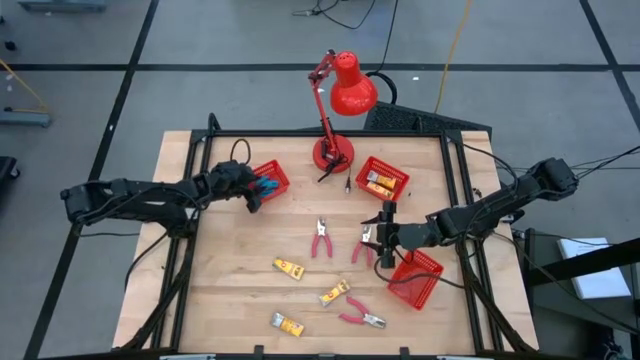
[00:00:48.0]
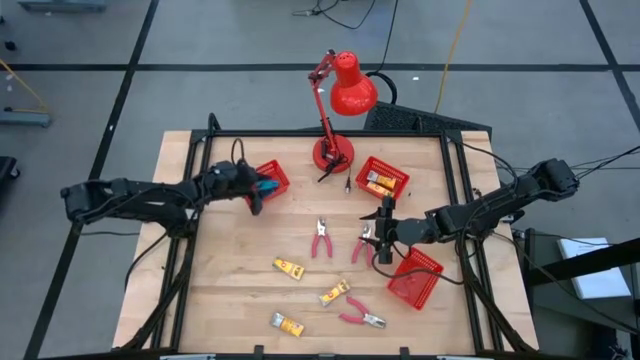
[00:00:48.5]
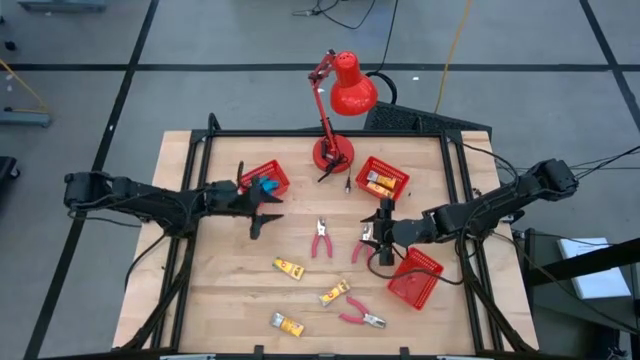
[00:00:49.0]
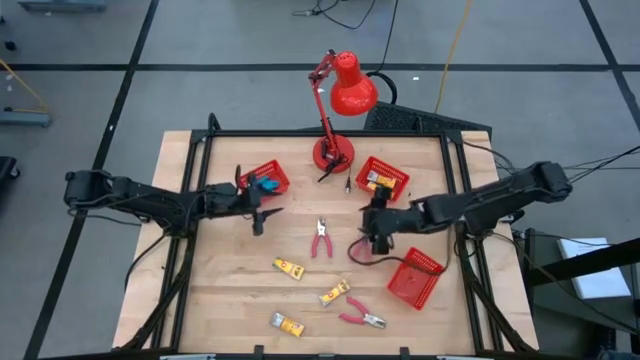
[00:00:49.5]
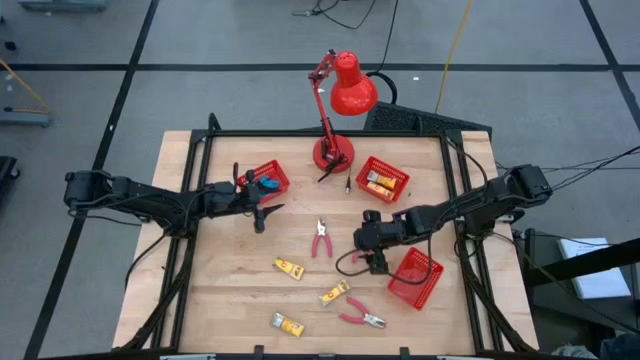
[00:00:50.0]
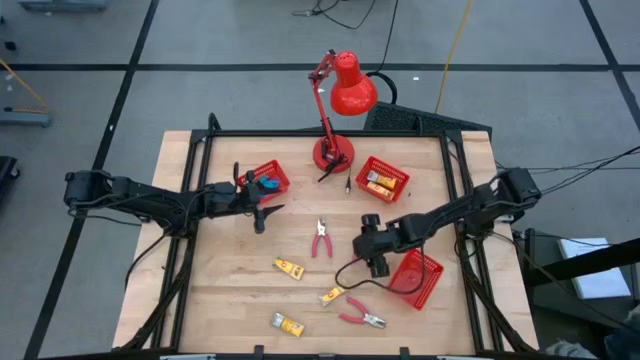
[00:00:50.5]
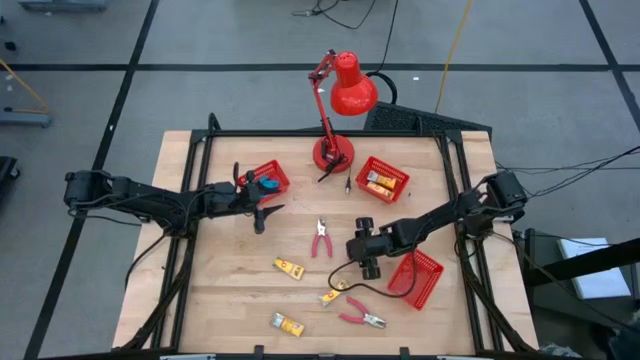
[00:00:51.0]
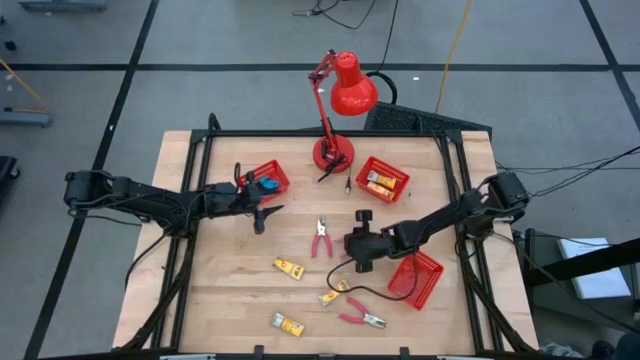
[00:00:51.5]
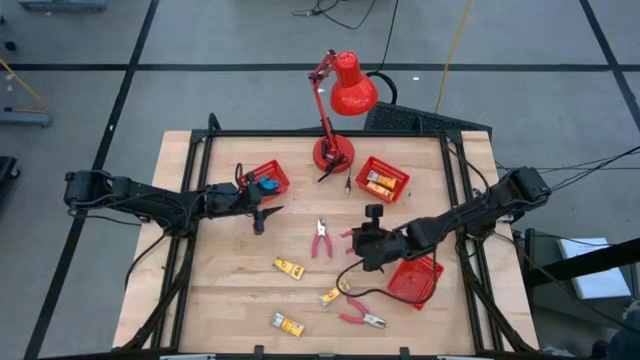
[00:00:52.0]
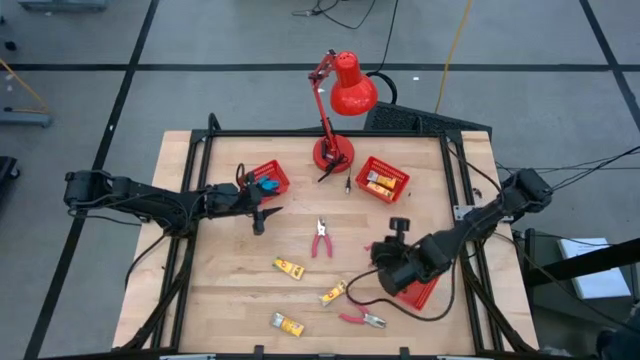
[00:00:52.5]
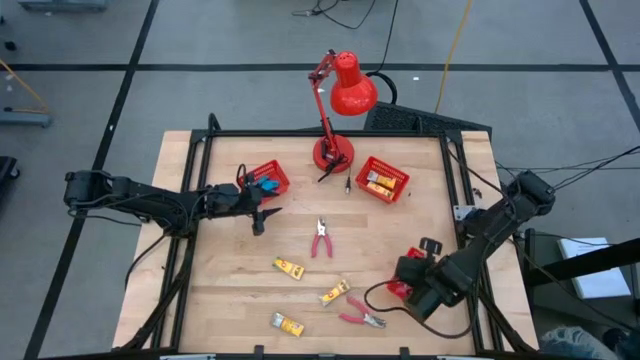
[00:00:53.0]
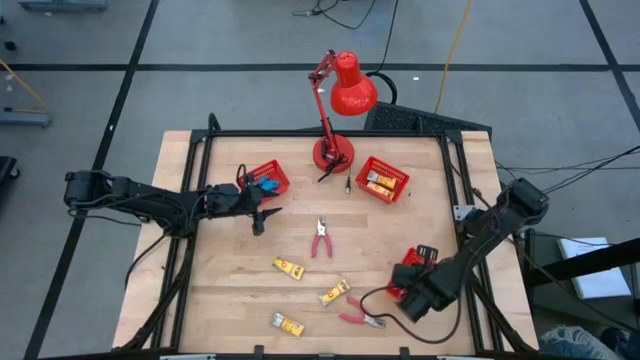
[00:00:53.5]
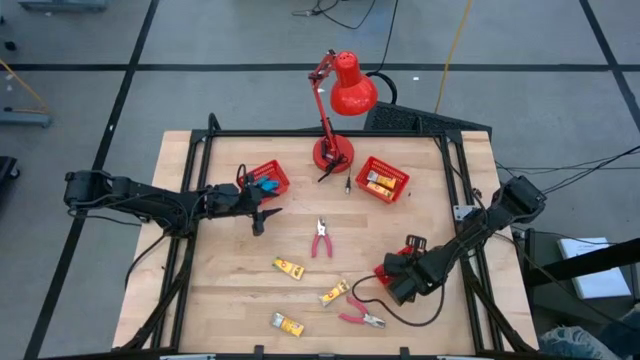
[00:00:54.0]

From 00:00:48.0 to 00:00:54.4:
Task: Pick & Place School Supplies
Put the pink hole puncher into the bottom red bin

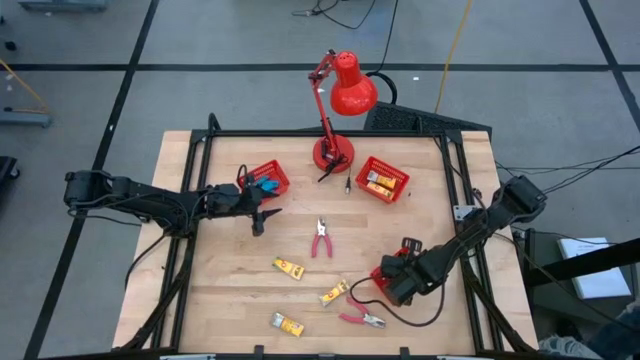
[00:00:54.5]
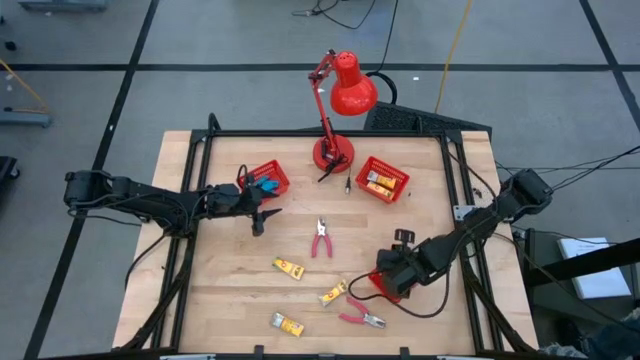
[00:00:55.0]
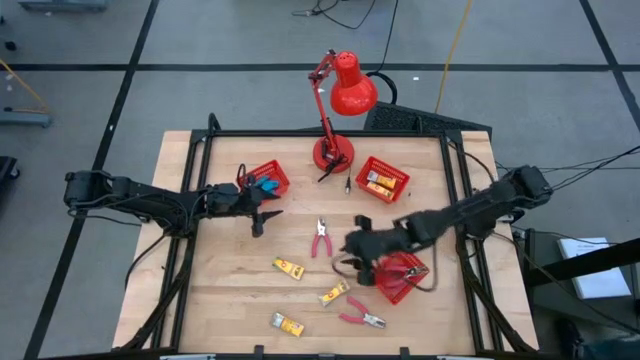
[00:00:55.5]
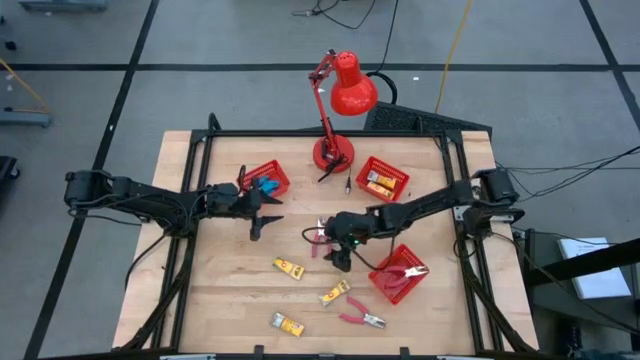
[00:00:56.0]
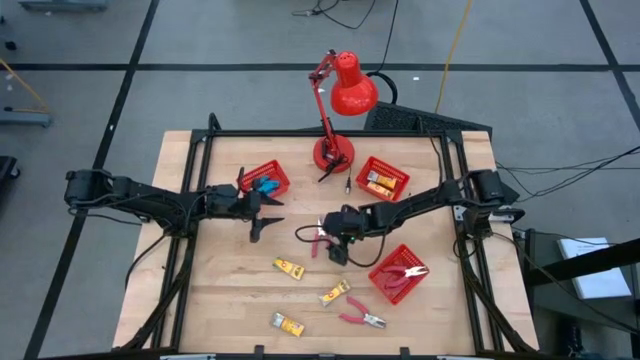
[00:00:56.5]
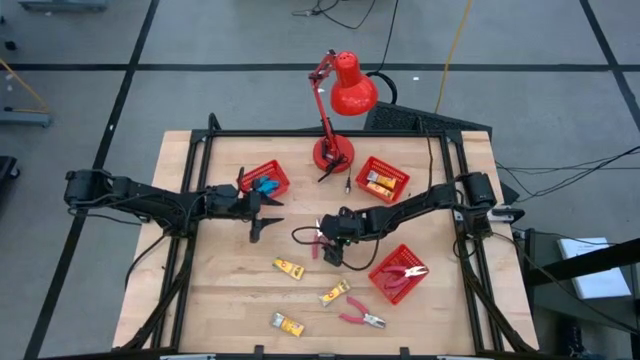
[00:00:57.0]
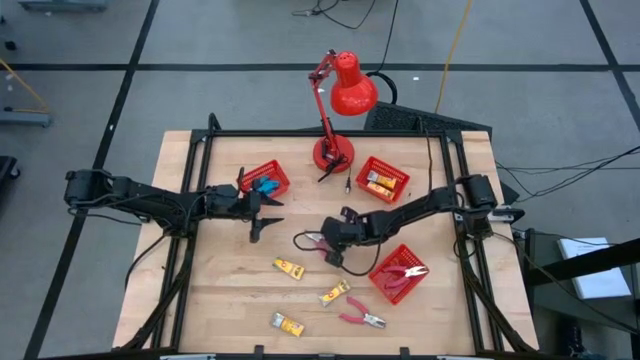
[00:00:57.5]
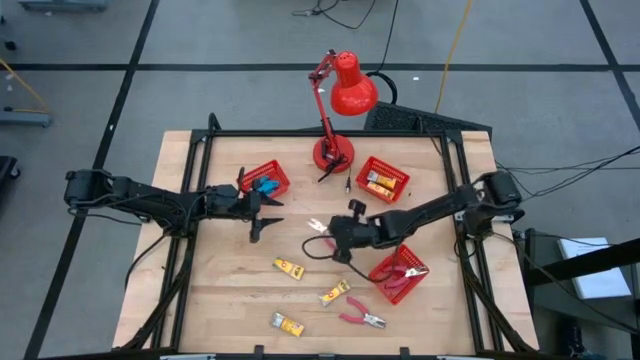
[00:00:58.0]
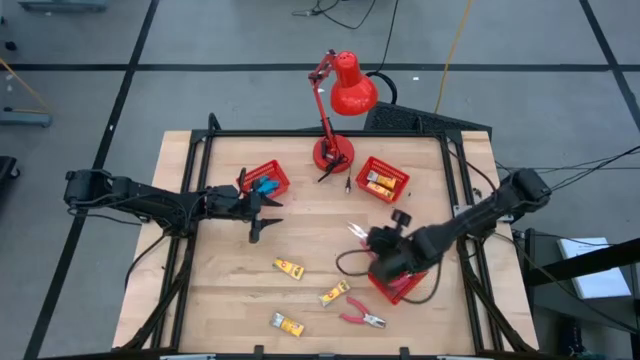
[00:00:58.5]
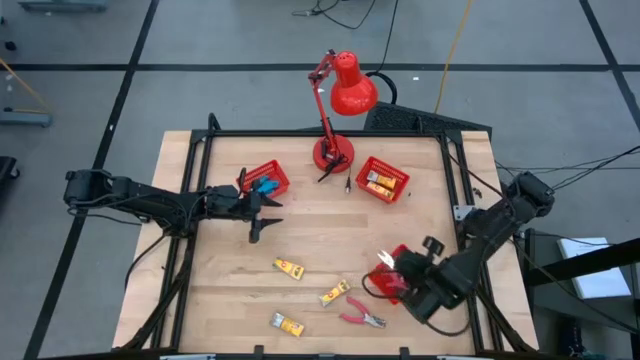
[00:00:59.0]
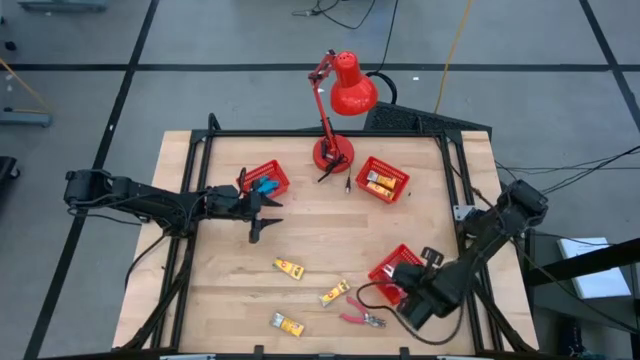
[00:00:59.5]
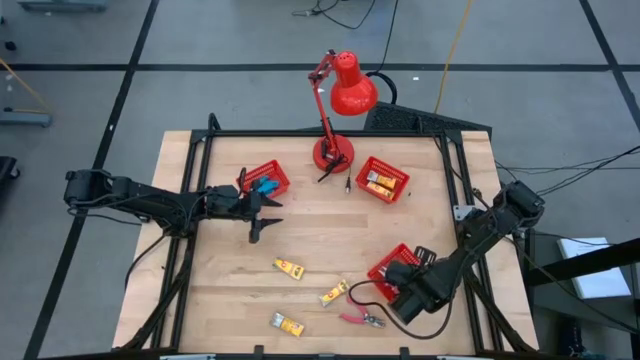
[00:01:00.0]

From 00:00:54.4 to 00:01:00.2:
Put the pink hole puncher into the bottom red bin

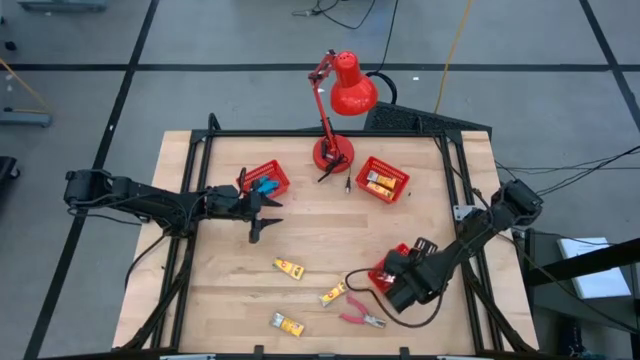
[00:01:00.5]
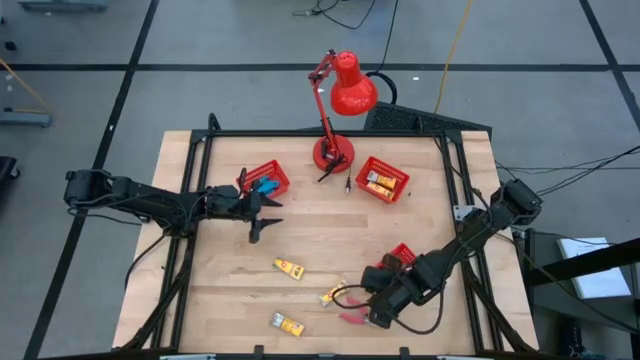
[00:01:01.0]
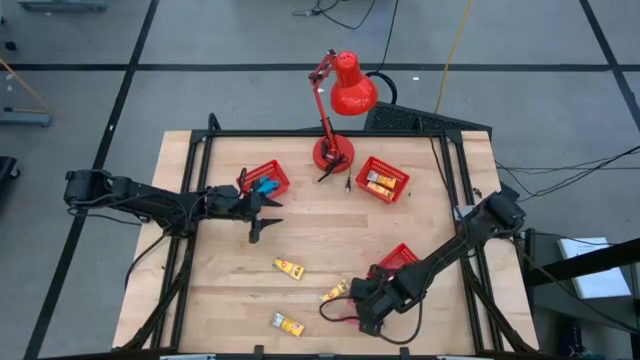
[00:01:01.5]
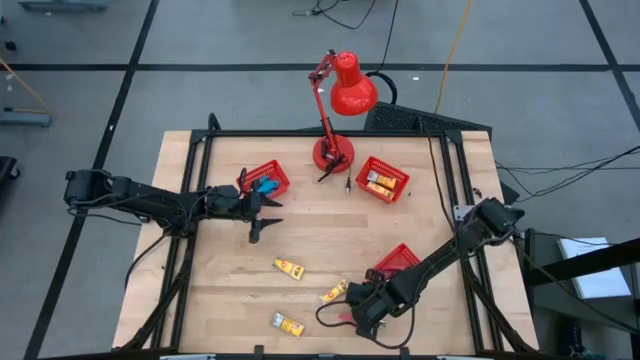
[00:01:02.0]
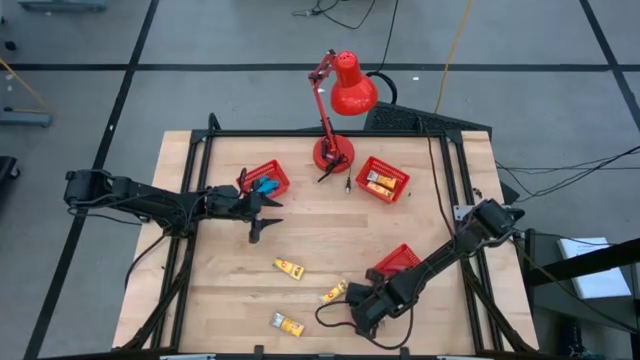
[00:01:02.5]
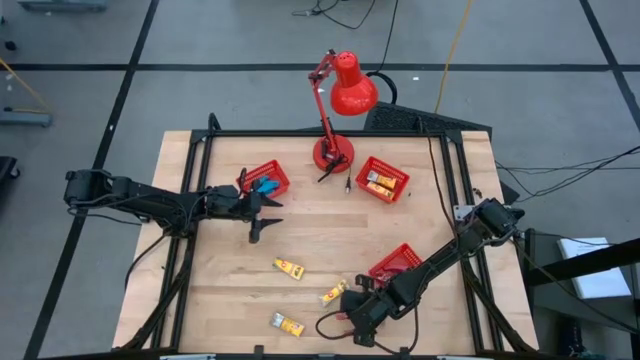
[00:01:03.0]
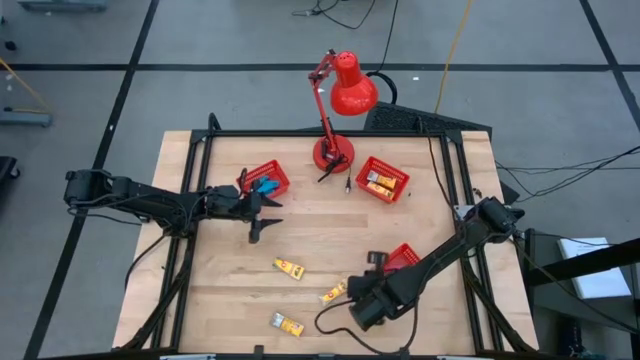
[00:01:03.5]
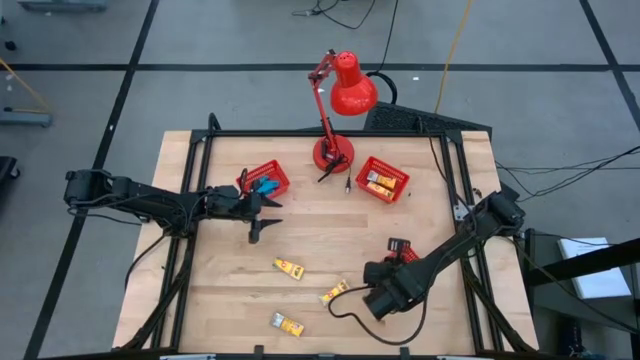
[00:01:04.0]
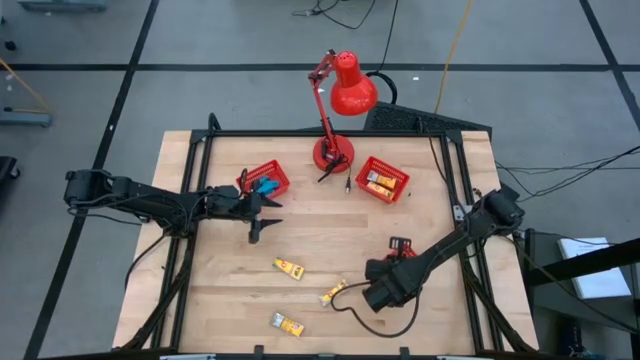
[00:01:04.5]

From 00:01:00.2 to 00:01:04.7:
Put the pink hole puncher into the bottom red bin

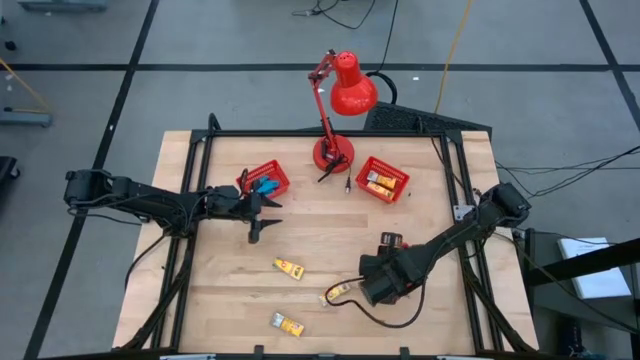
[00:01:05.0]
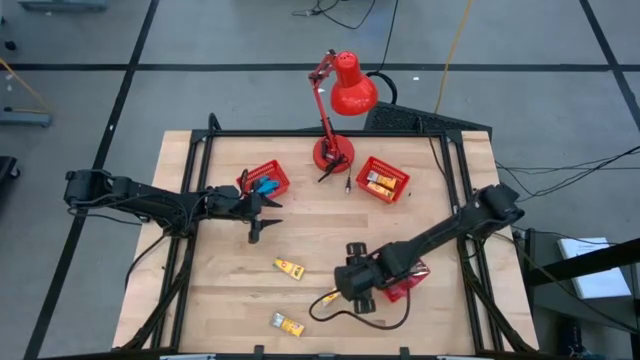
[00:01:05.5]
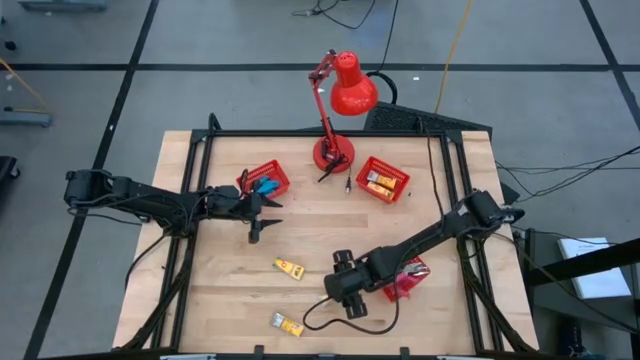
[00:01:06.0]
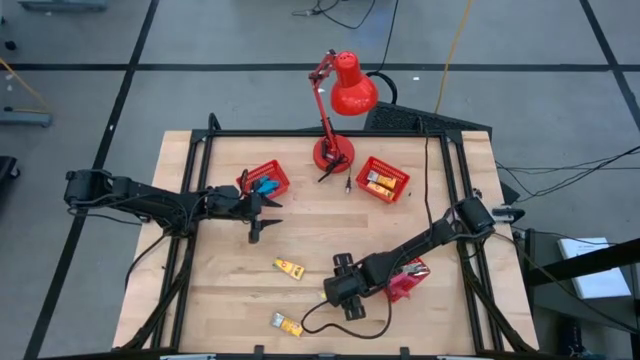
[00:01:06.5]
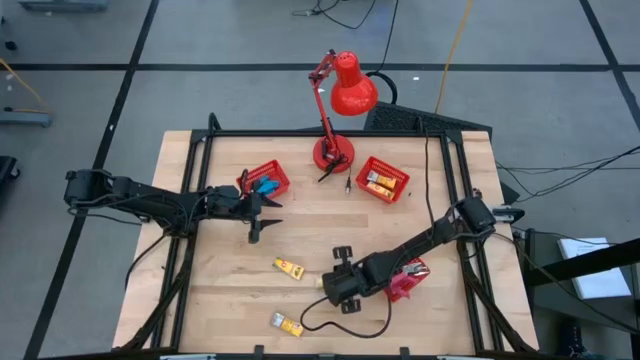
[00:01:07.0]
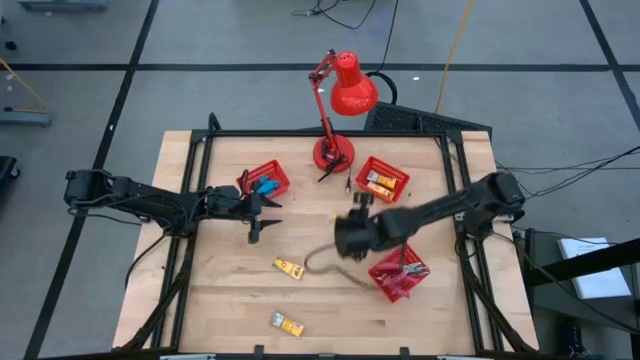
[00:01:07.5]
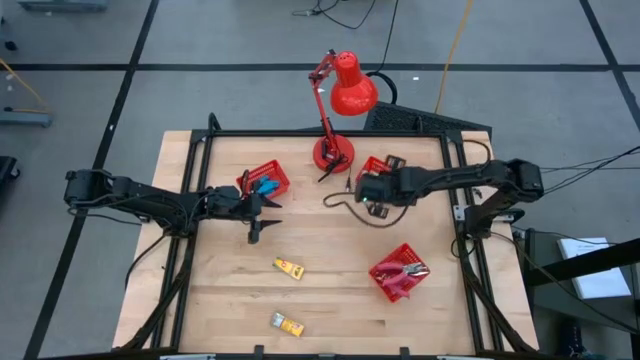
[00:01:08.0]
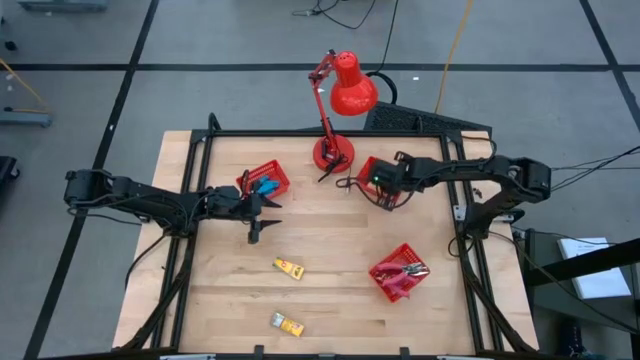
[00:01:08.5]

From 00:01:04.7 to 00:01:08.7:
Put the yellow crayon box into the top right red bin
